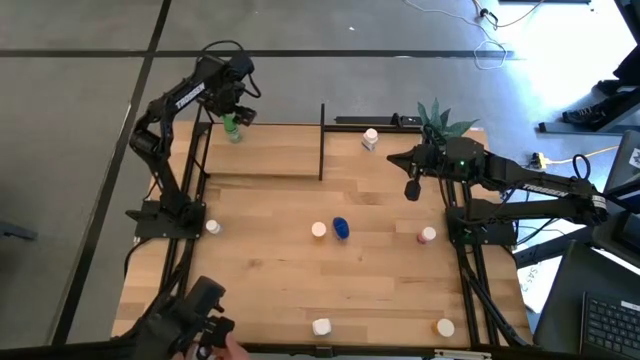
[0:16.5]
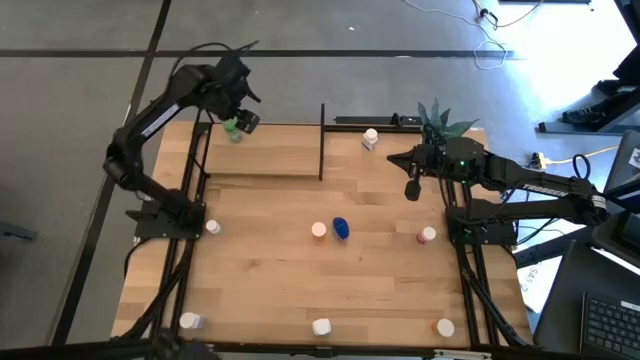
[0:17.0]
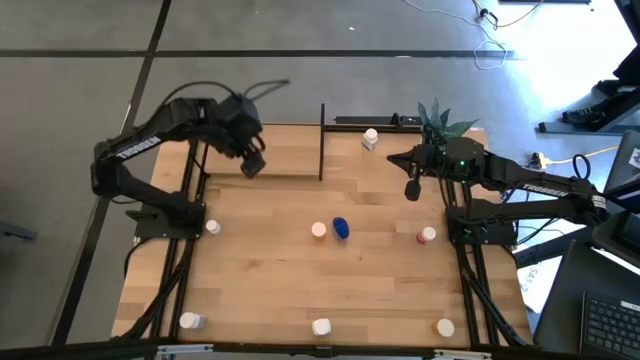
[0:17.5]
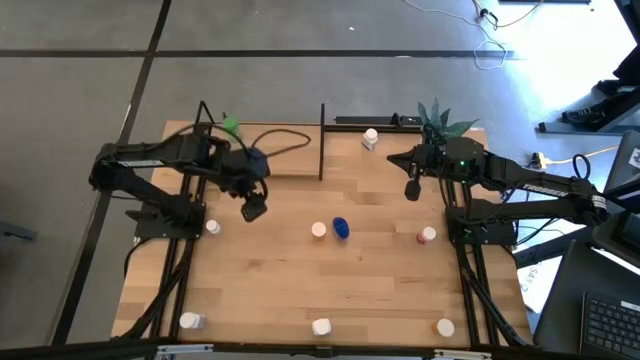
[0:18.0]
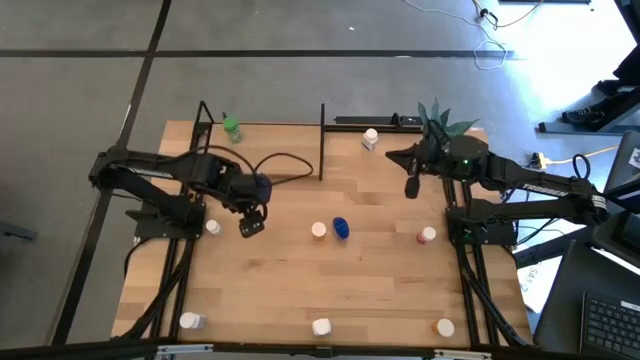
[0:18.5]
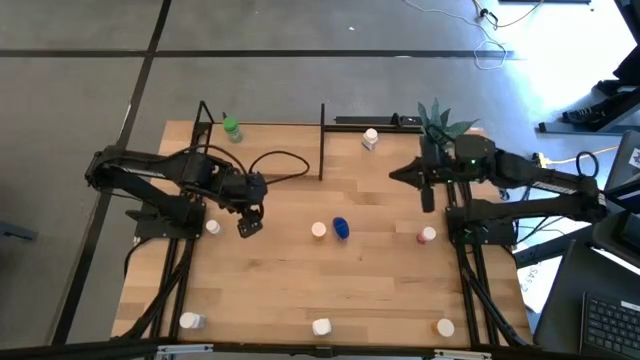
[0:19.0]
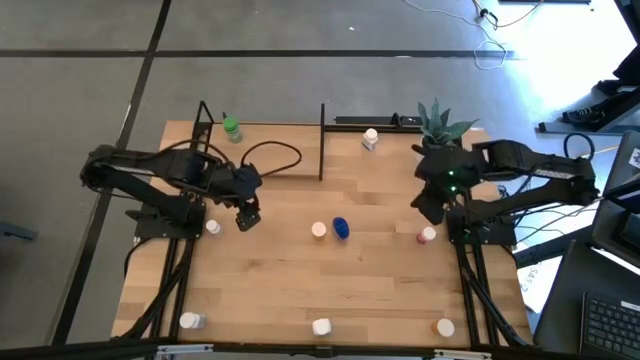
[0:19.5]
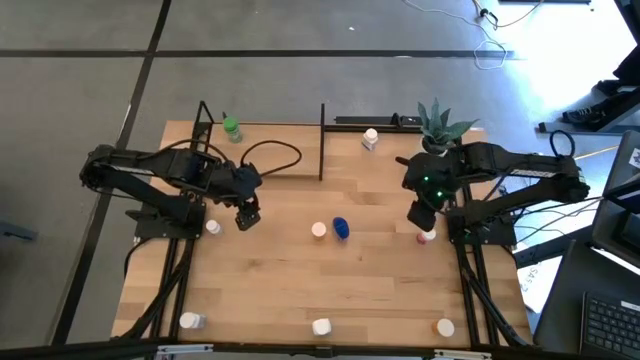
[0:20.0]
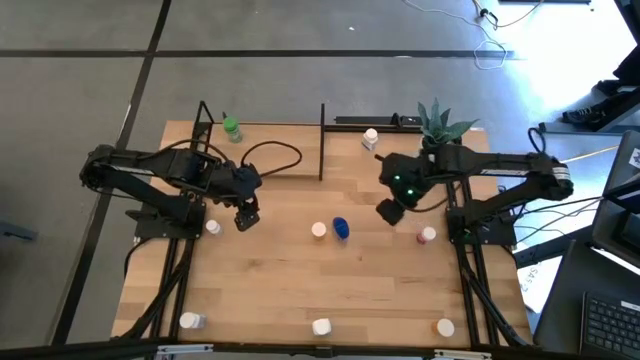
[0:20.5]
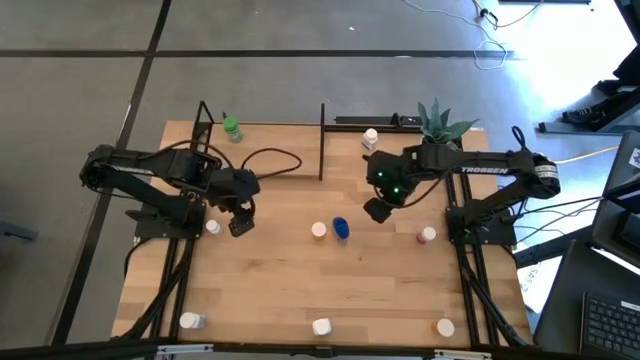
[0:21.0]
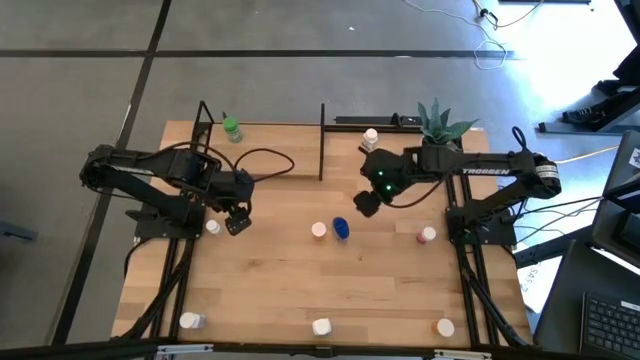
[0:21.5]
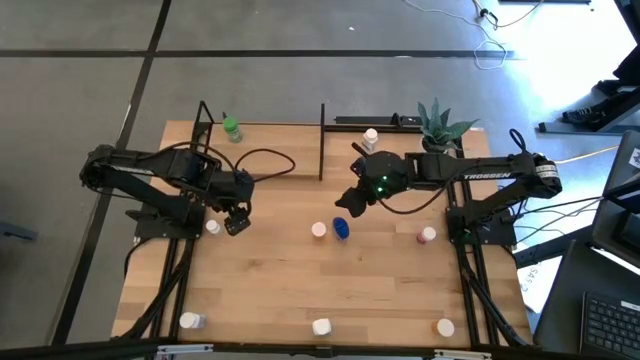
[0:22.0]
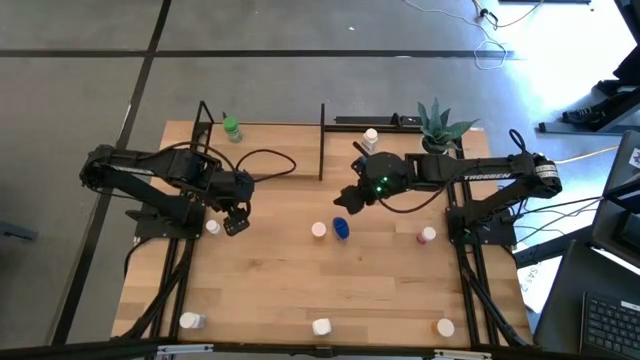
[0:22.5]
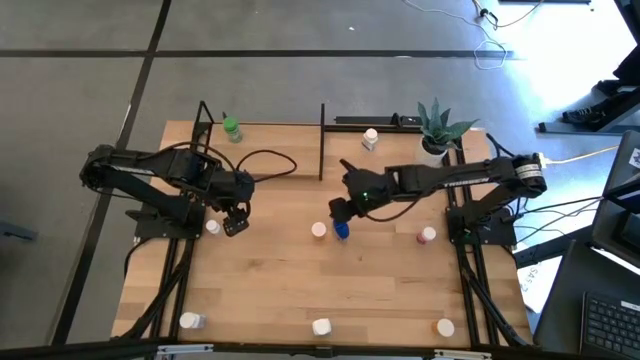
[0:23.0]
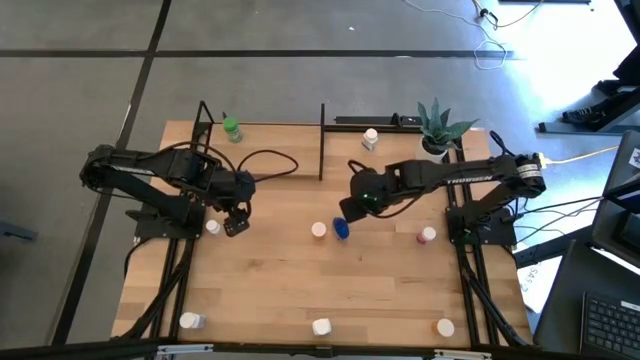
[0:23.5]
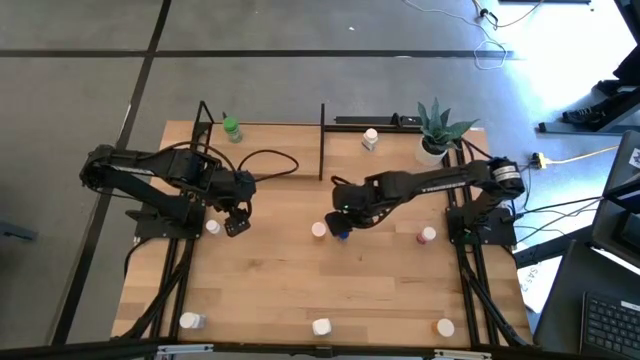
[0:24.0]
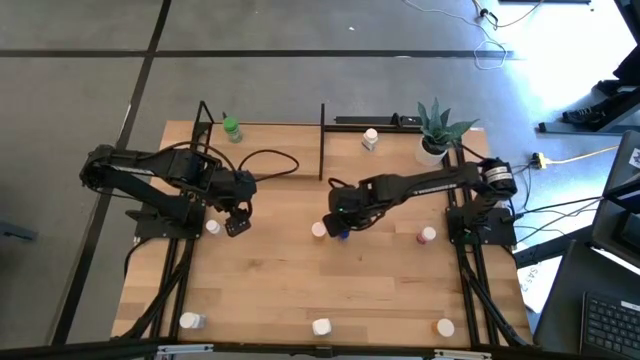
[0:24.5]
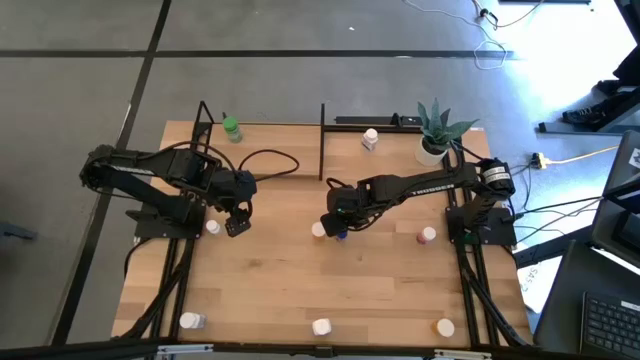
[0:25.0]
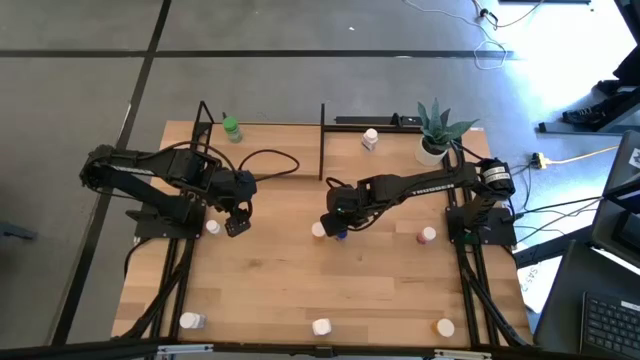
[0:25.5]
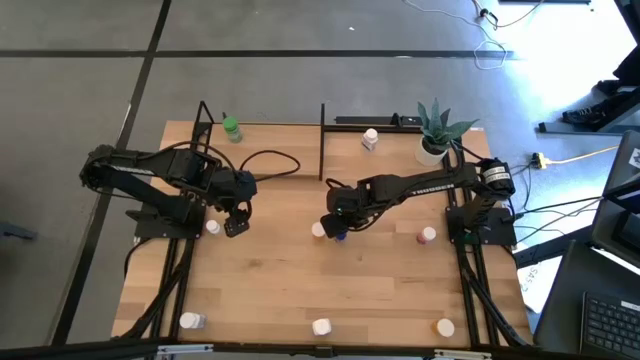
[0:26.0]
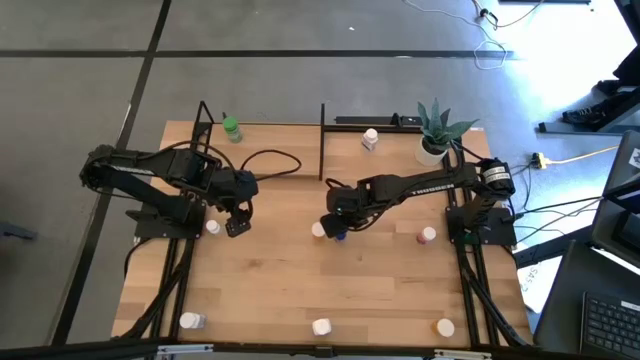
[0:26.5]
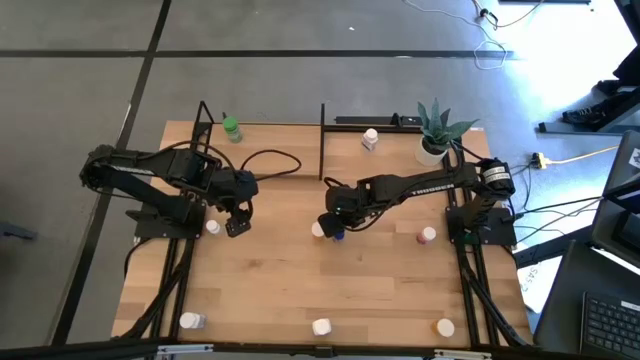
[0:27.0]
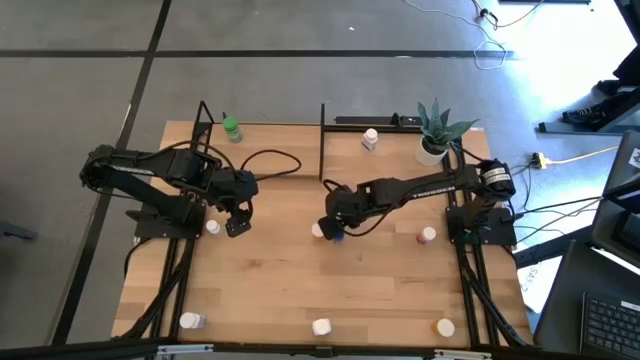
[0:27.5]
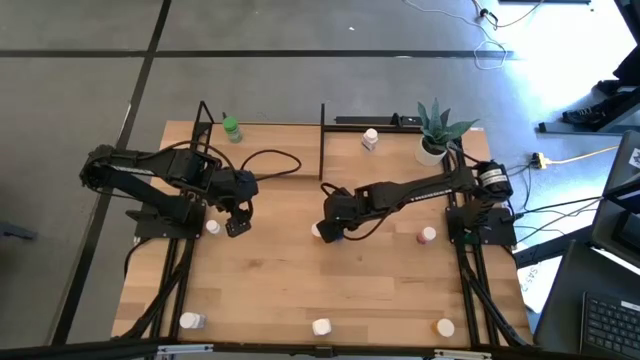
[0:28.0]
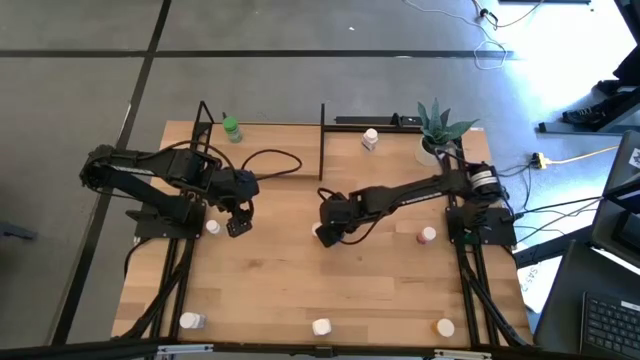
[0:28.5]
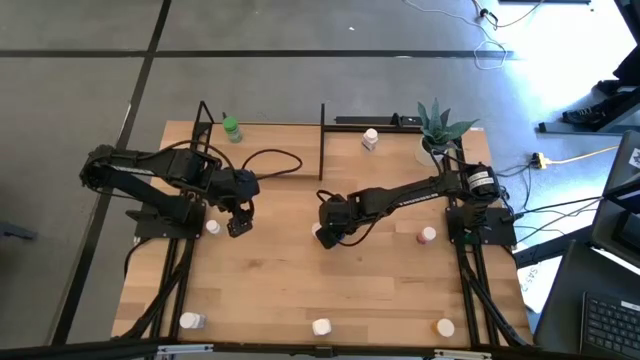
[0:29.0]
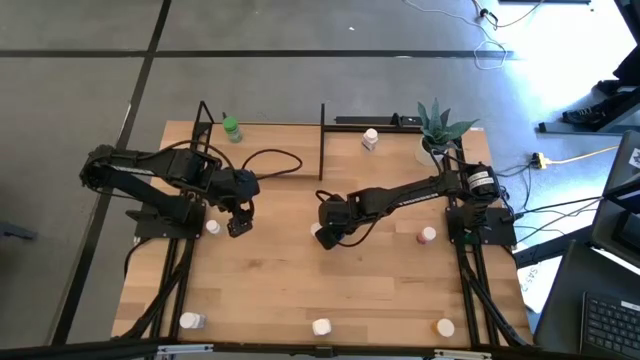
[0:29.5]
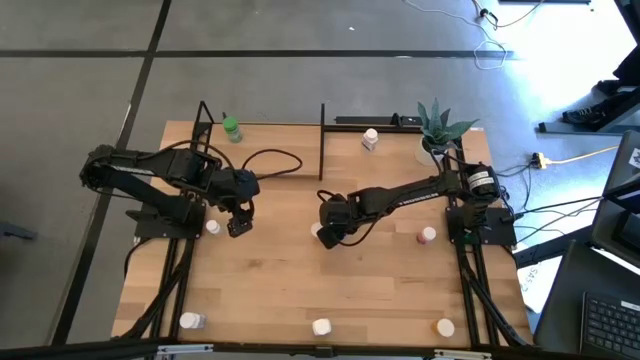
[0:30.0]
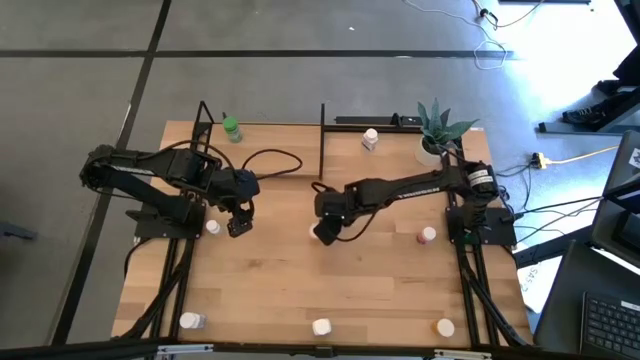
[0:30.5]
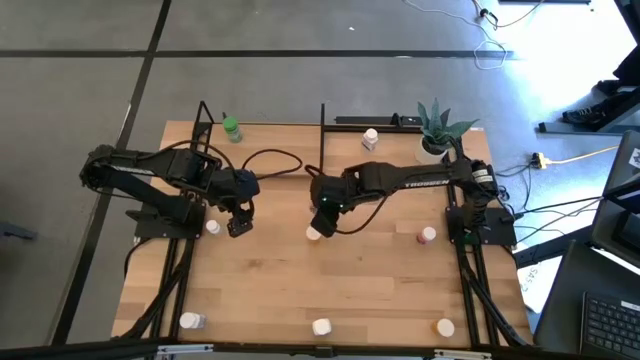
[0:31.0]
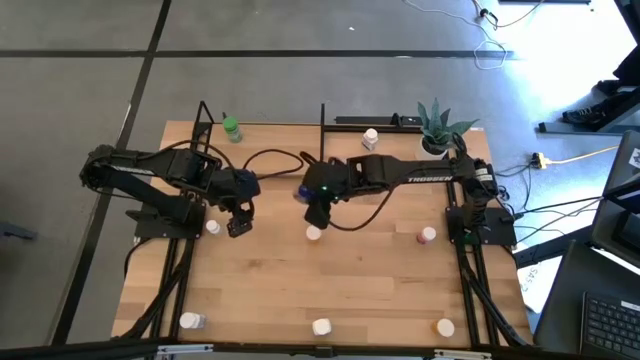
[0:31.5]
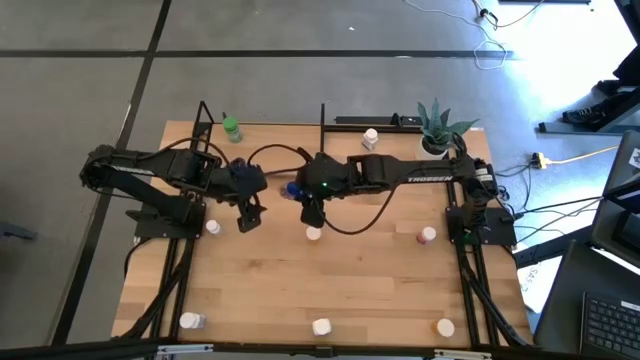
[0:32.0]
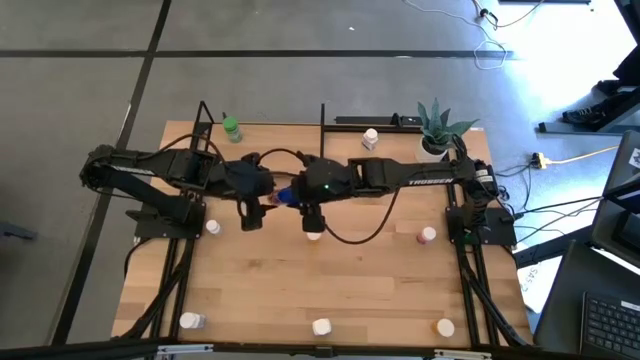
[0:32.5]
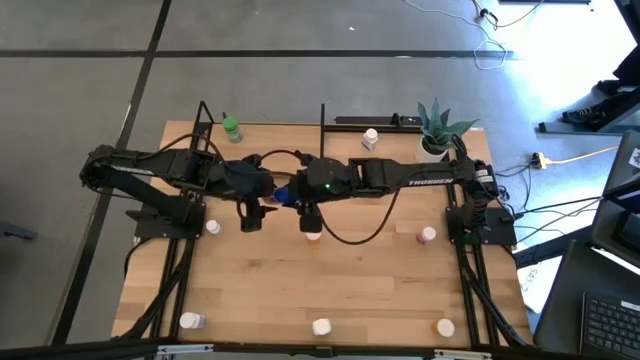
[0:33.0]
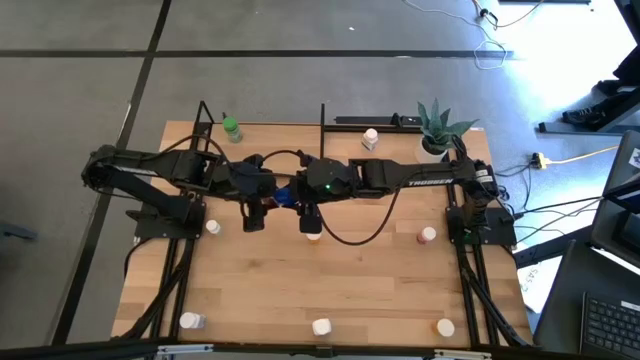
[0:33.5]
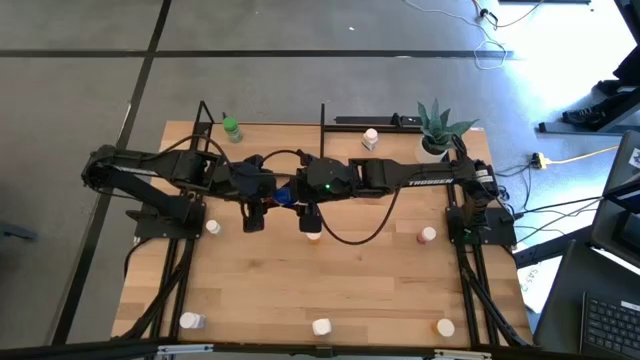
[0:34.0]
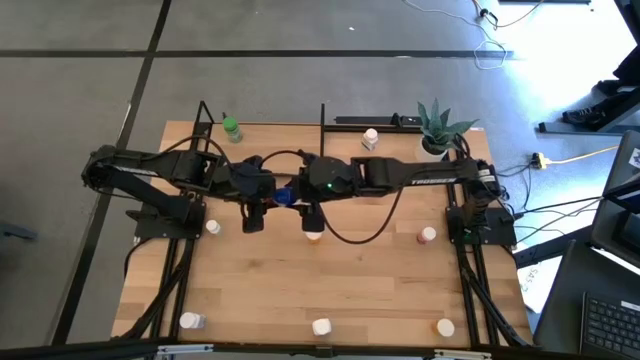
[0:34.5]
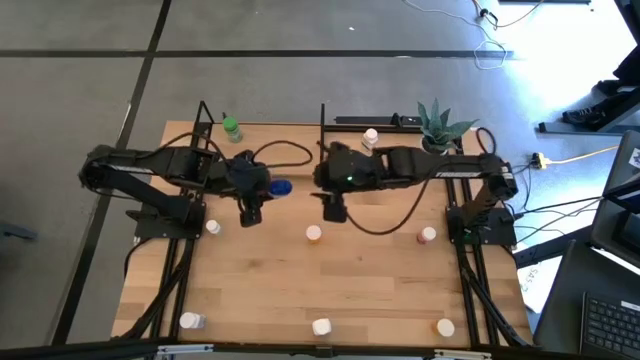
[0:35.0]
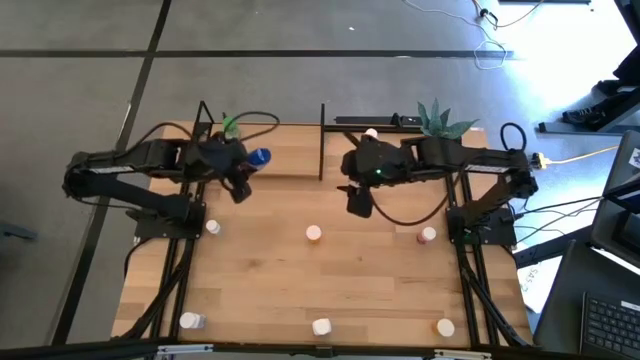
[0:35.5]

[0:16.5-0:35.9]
Task: Pick and place medicine bottles onto shelf by color
Put the blue pill bottle on the shelf
